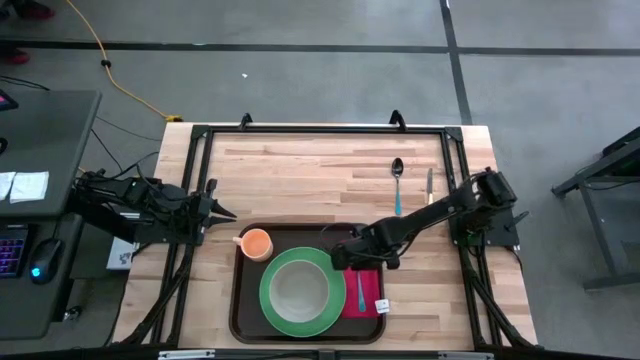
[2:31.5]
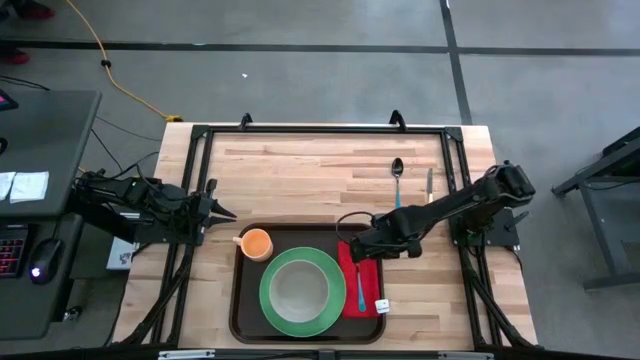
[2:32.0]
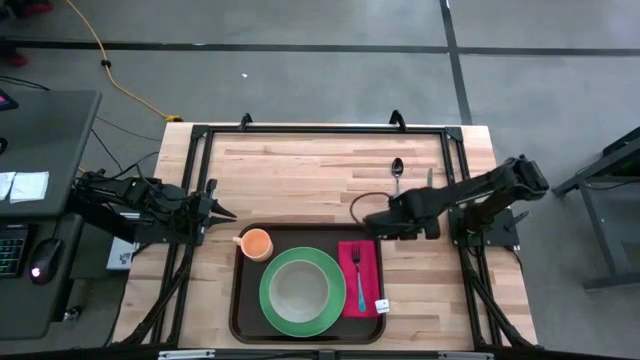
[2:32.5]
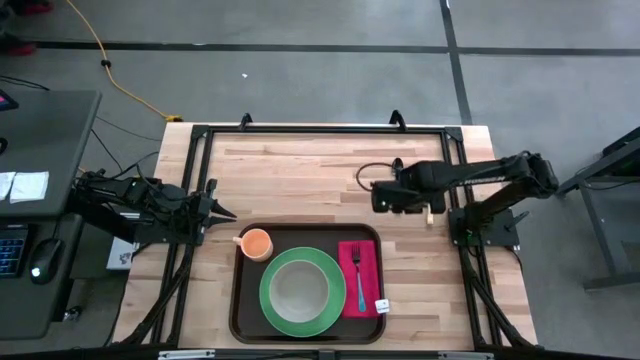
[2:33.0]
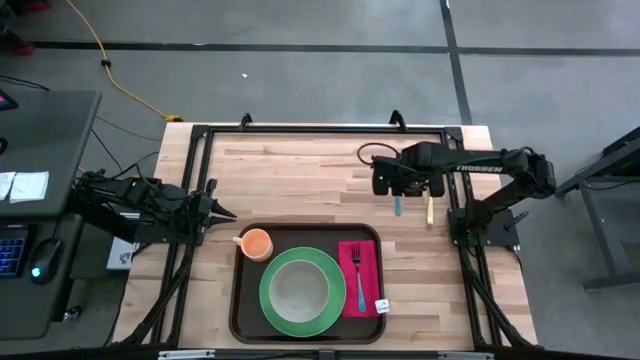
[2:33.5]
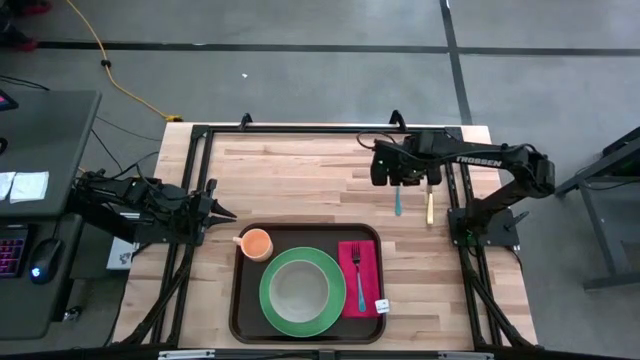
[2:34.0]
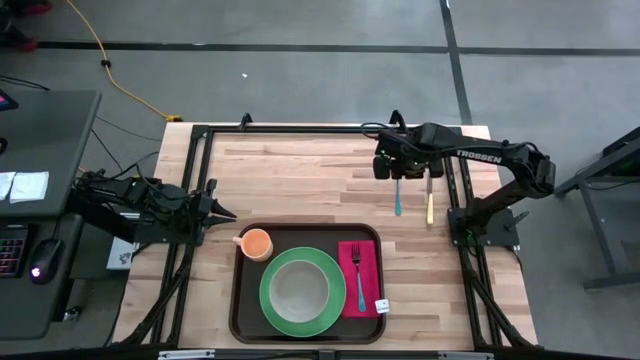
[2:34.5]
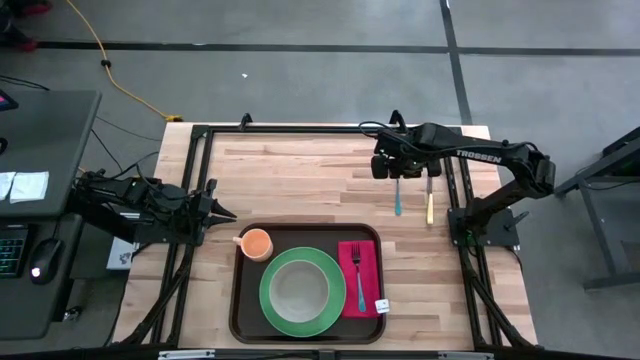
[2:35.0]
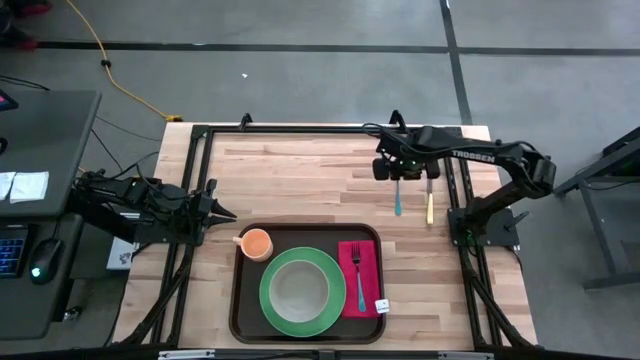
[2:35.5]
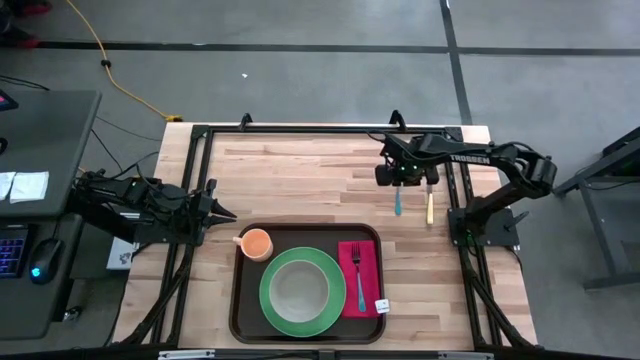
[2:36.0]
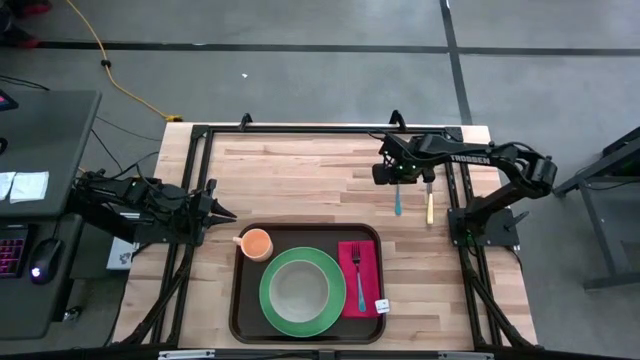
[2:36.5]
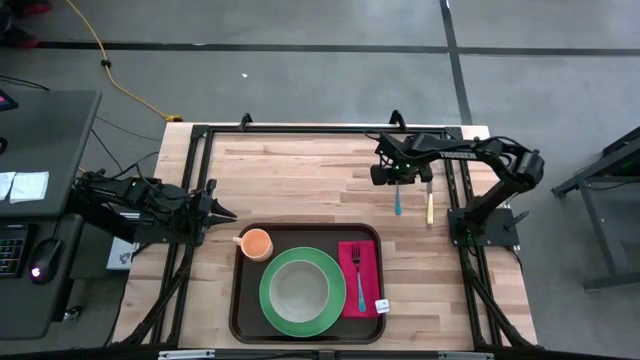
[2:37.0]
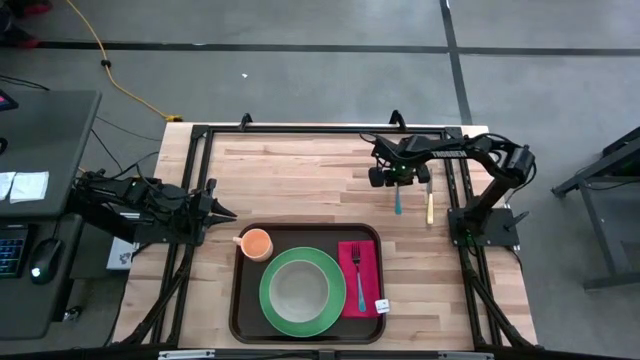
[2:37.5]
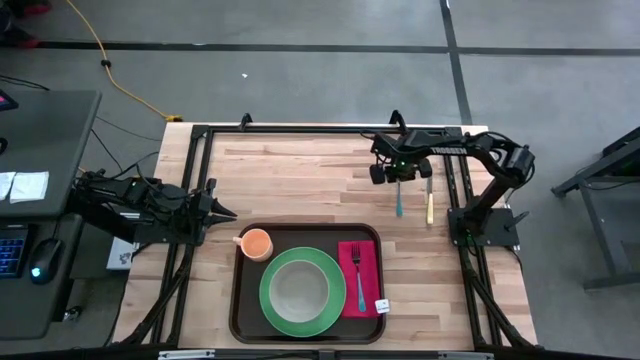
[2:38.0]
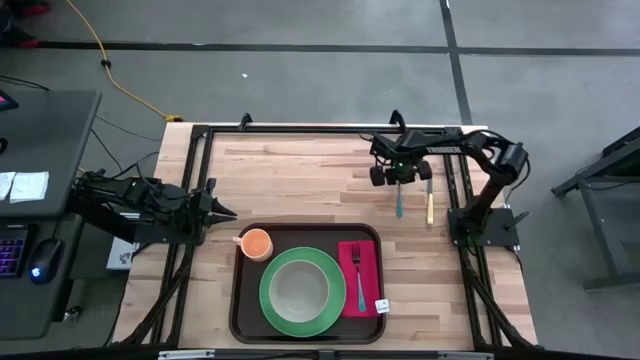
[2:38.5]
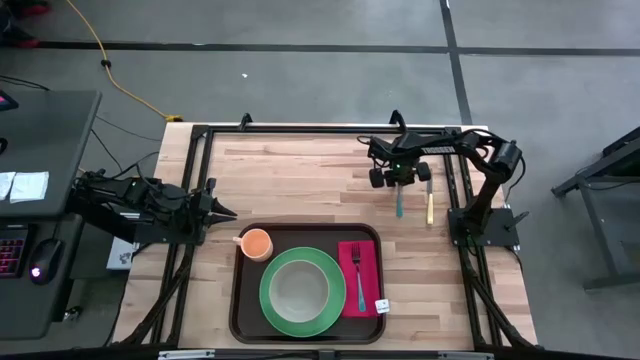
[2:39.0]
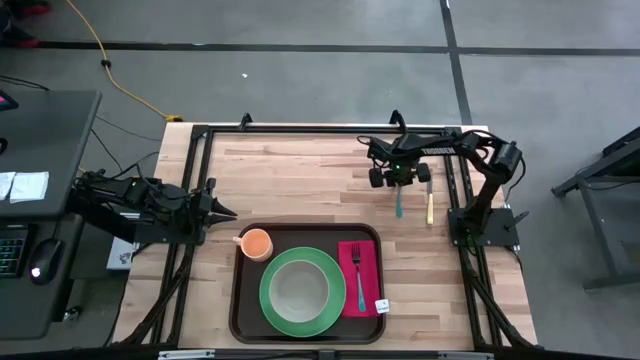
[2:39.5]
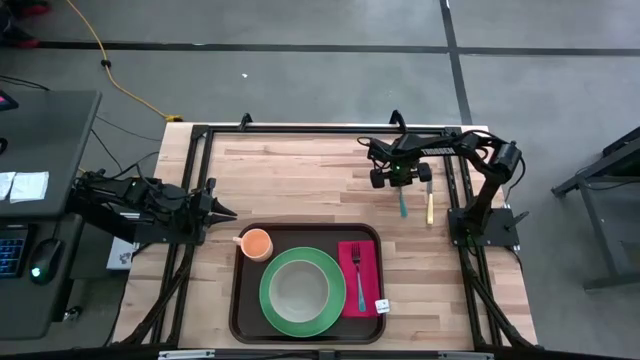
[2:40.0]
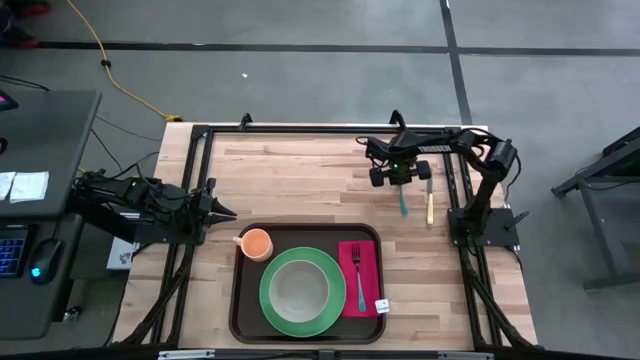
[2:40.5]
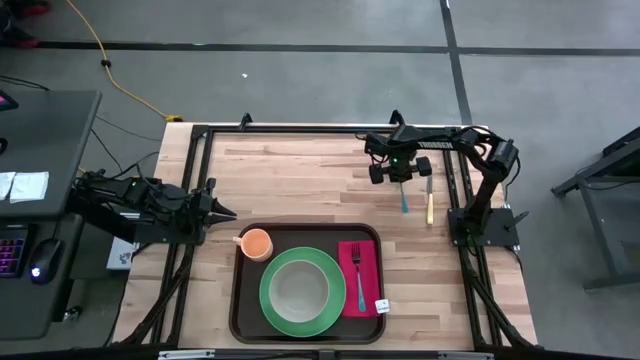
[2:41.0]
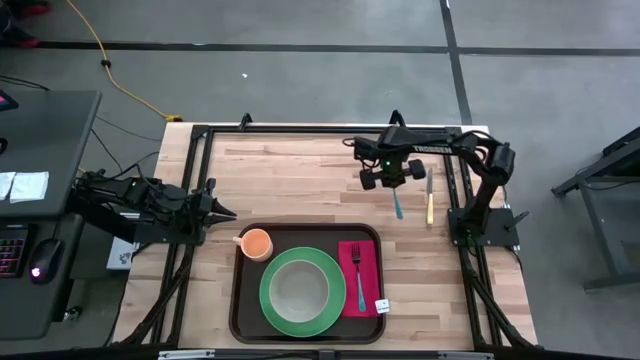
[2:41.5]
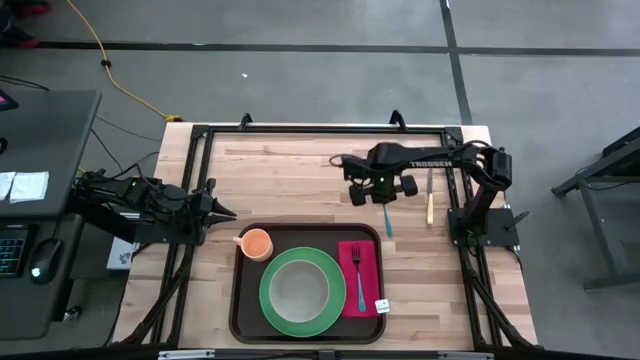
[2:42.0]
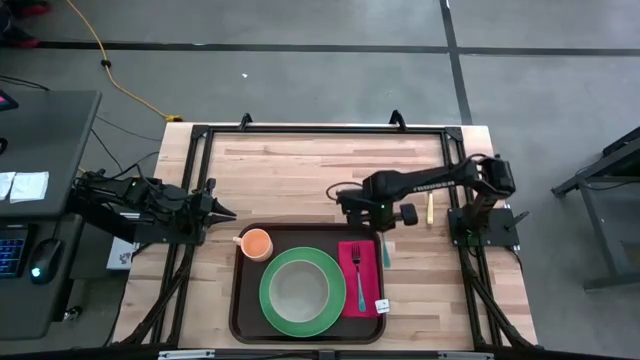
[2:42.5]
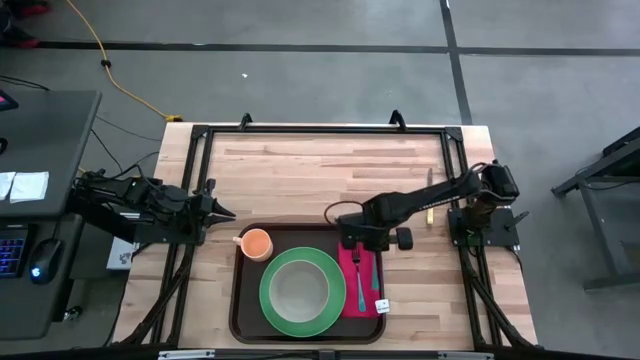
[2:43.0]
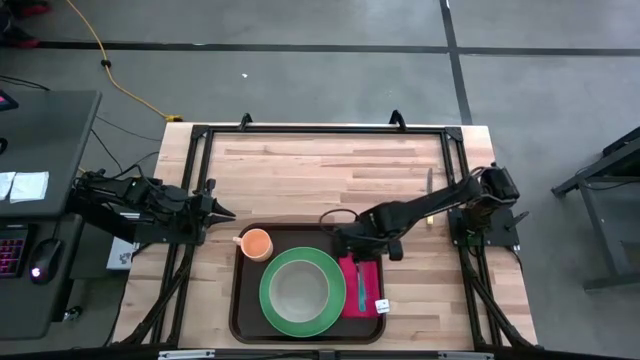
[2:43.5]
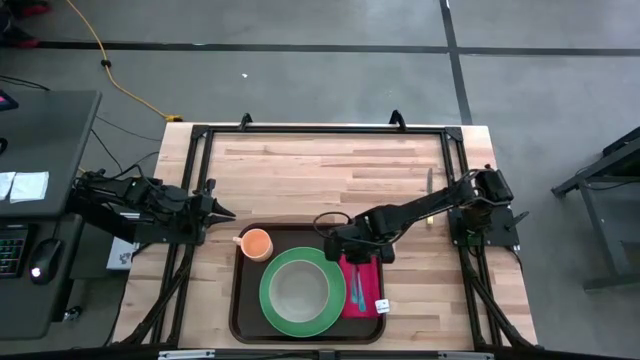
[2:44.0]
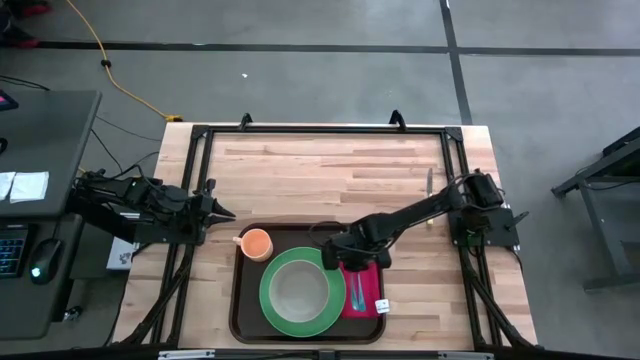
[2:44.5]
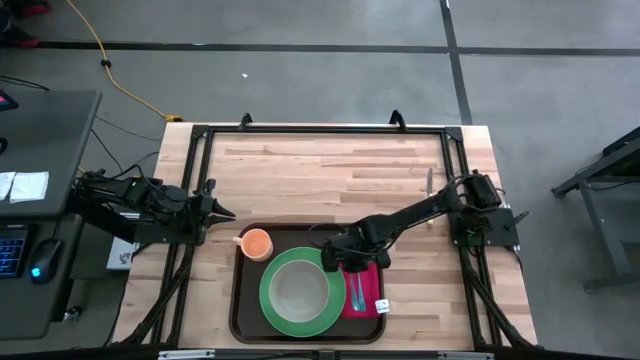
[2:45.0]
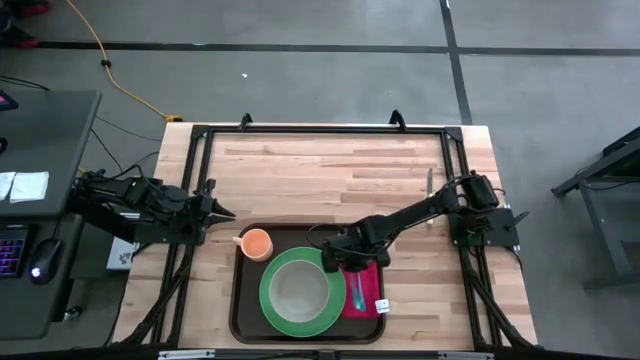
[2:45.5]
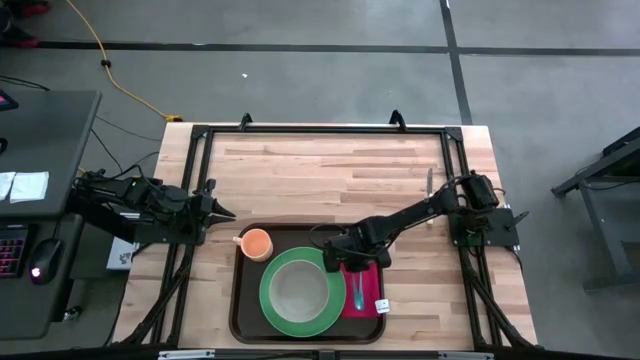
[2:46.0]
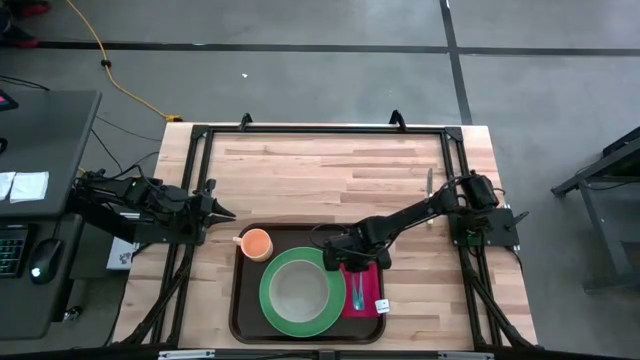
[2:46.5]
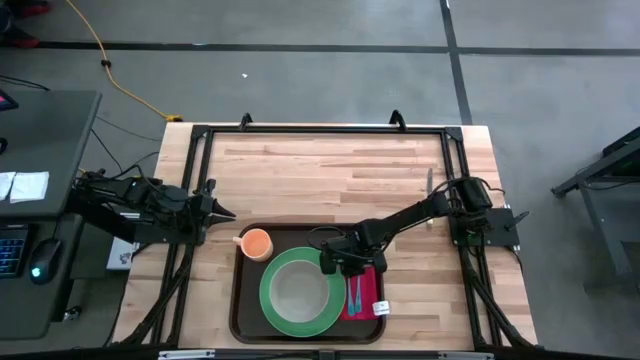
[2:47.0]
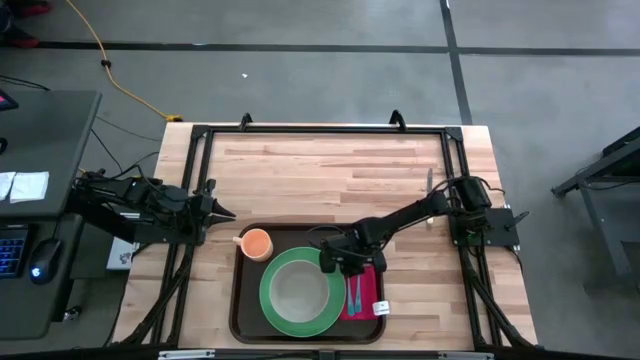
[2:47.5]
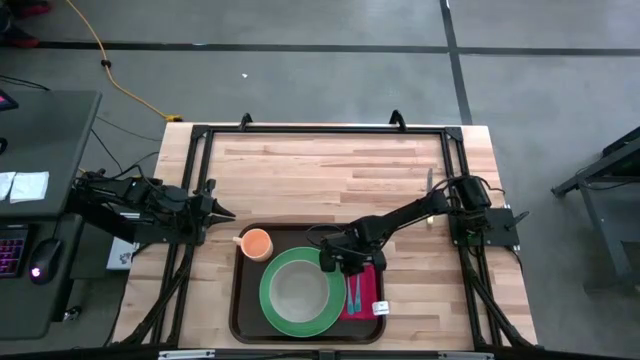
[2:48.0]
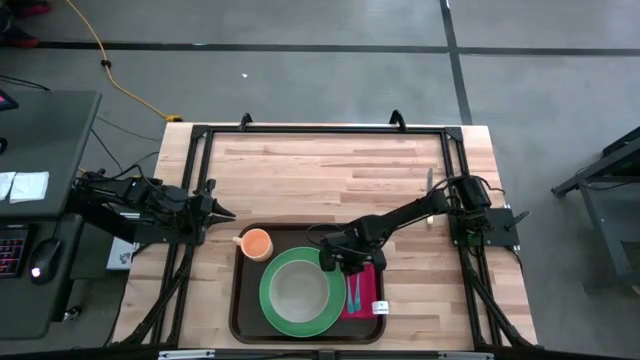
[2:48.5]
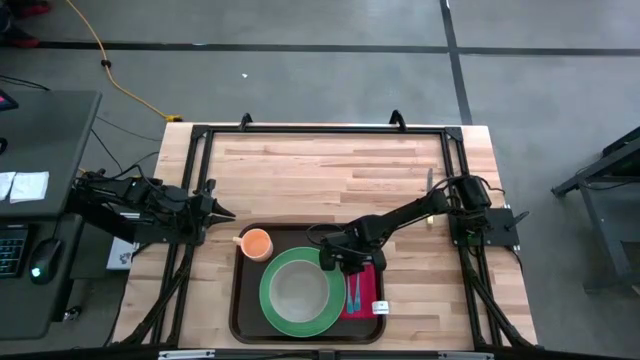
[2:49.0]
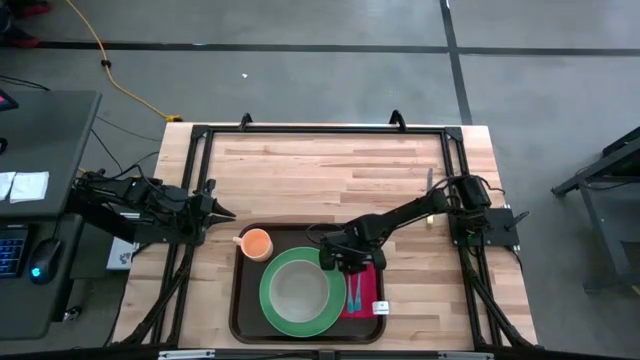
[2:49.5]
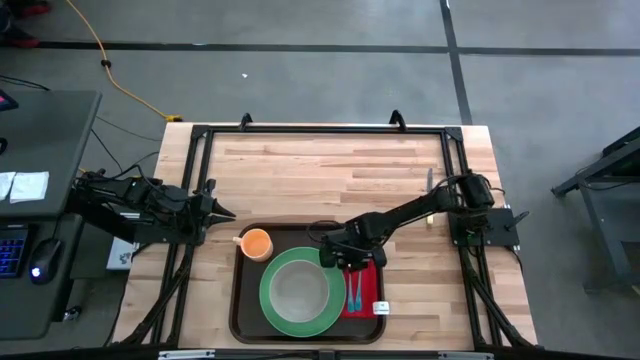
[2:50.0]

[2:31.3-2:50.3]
Task: Set up tray
Put the blue spoon on top of the red napkin between the green plate and blue fork

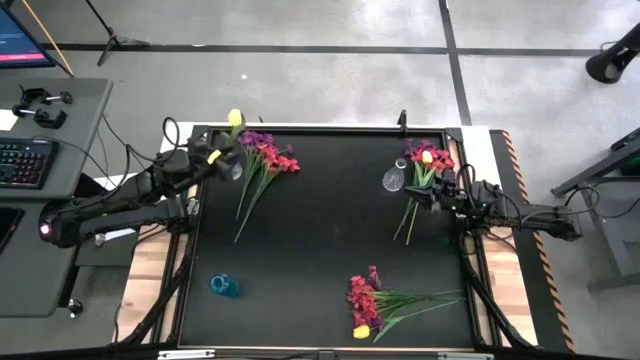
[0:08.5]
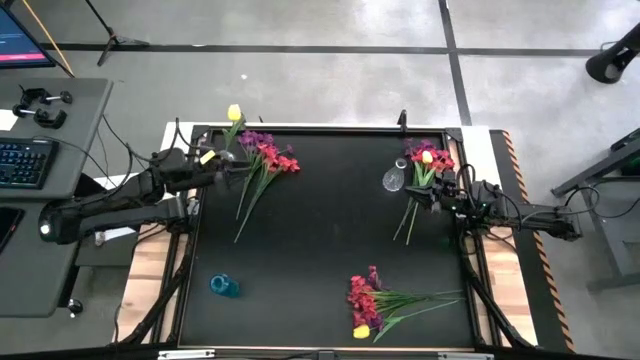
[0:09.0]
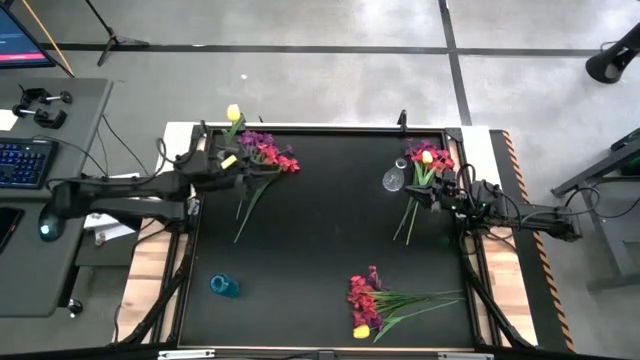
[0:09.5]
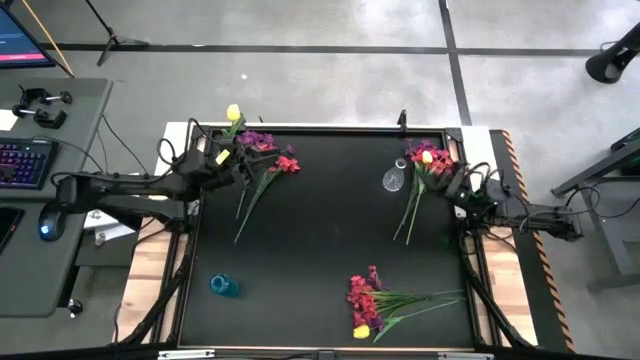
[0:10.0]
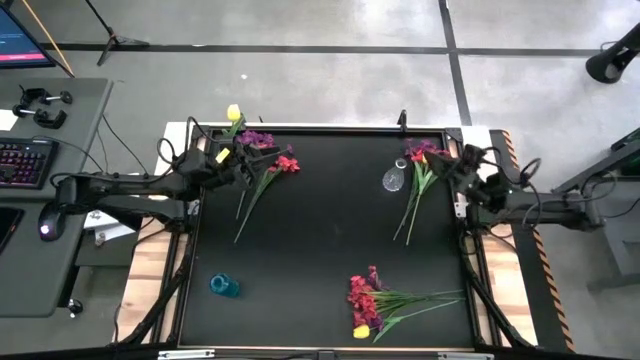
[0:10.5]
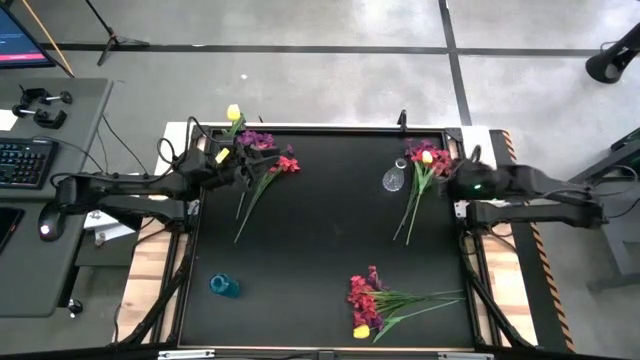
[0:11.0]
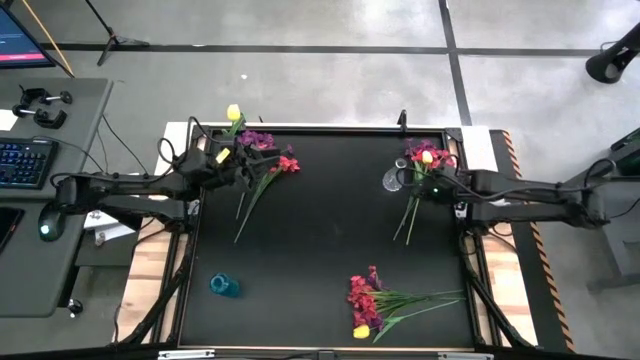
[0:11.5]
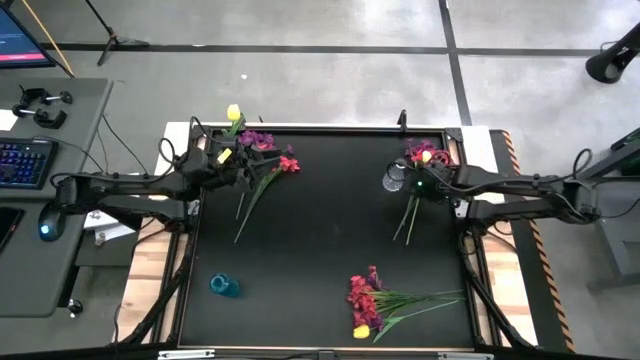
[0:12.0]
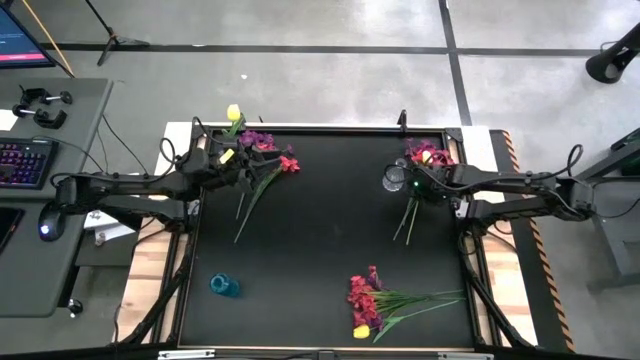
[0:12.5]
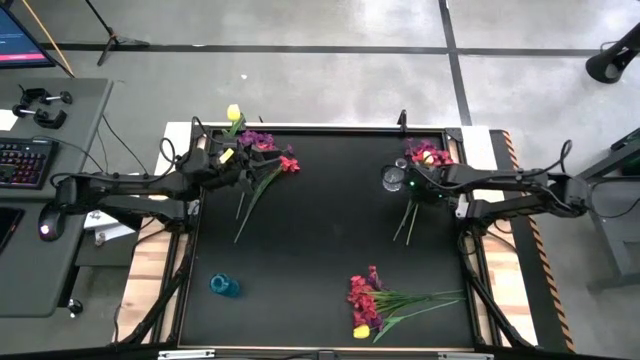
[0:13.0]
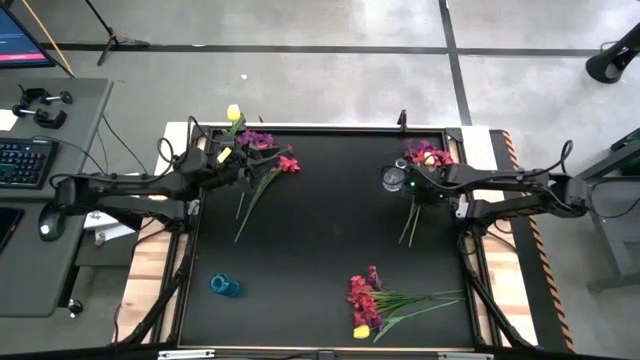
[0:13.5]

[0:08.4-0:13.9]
Task: Sort flowers into vase by color
Put the top yellow flower into the left transparent vase
